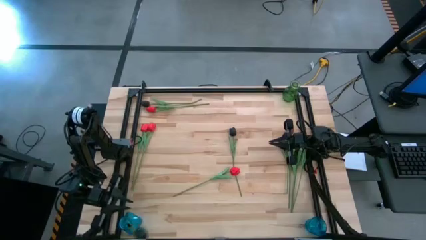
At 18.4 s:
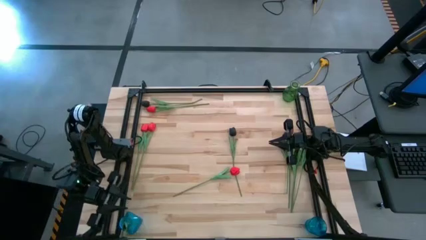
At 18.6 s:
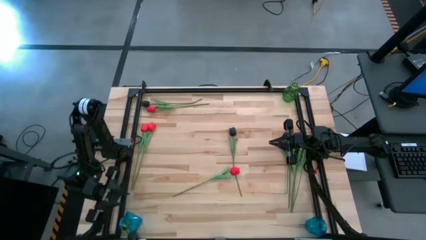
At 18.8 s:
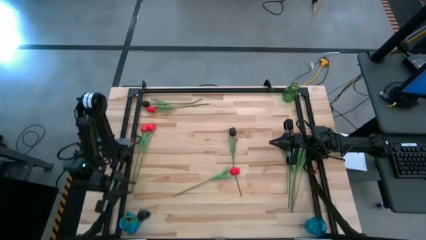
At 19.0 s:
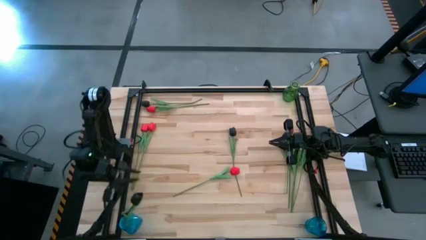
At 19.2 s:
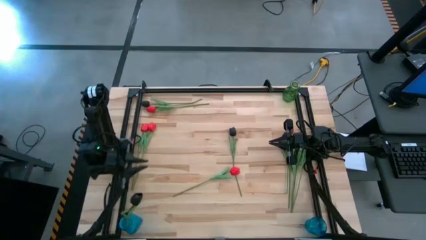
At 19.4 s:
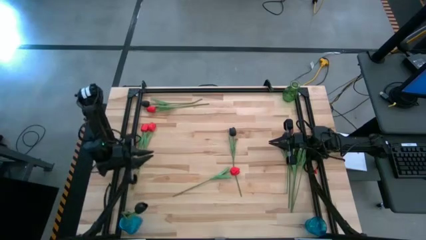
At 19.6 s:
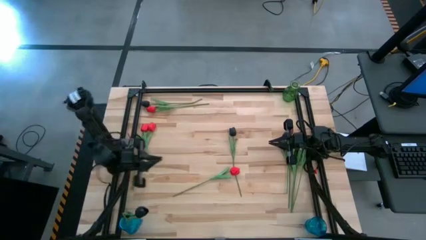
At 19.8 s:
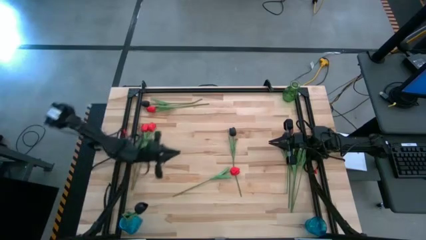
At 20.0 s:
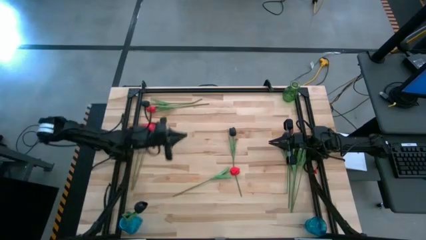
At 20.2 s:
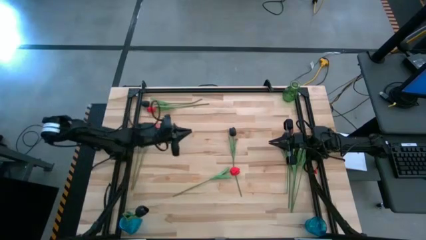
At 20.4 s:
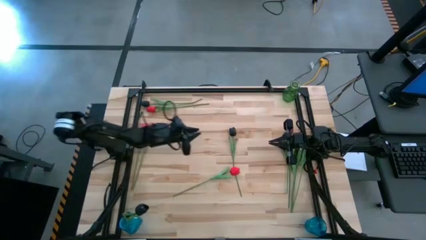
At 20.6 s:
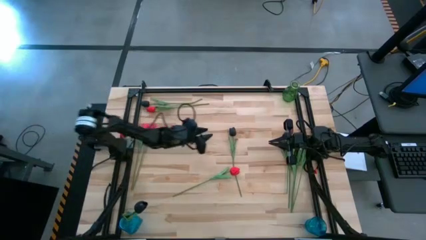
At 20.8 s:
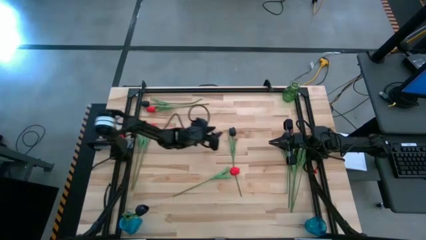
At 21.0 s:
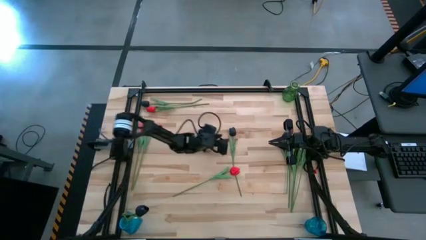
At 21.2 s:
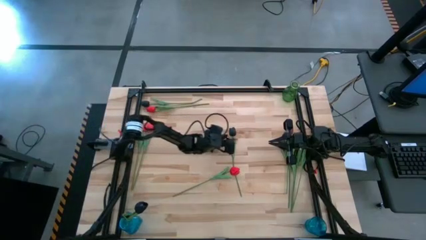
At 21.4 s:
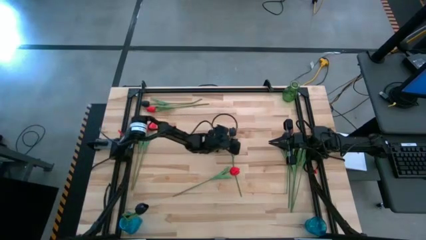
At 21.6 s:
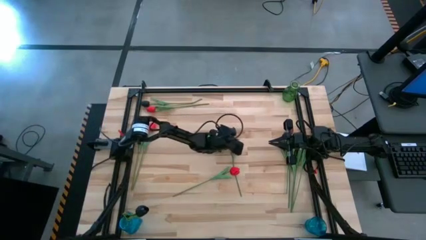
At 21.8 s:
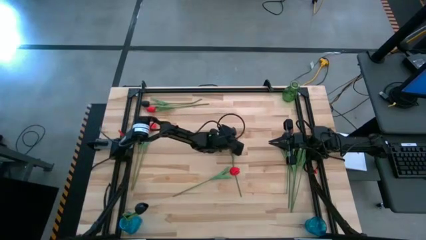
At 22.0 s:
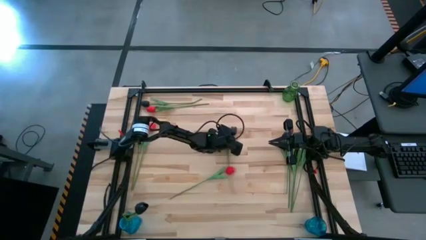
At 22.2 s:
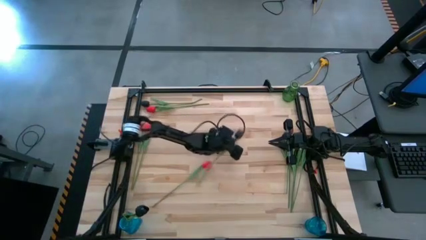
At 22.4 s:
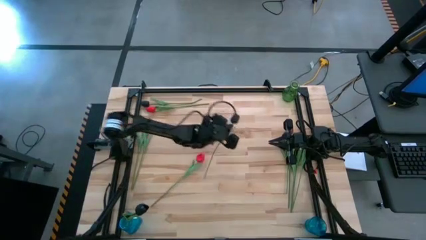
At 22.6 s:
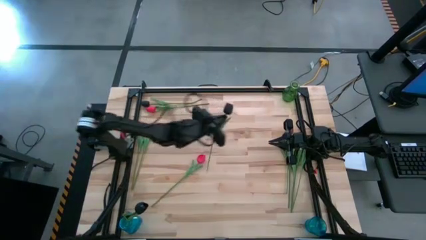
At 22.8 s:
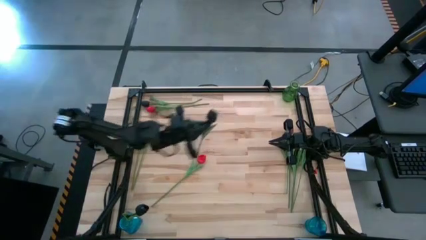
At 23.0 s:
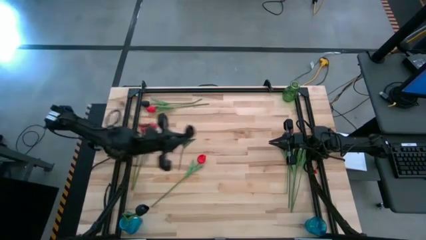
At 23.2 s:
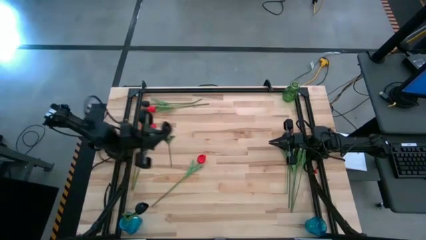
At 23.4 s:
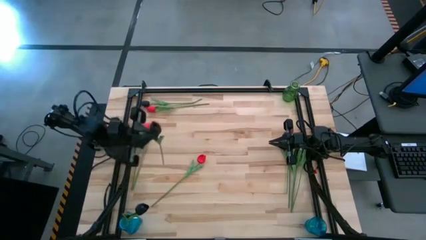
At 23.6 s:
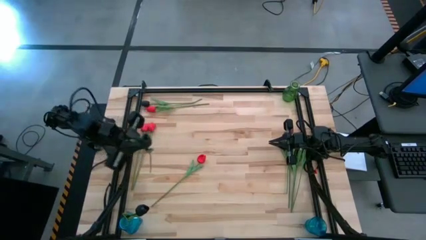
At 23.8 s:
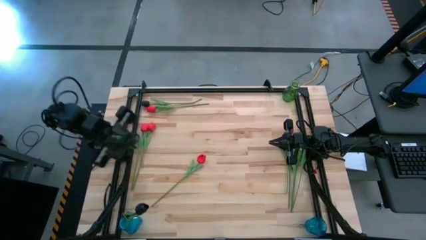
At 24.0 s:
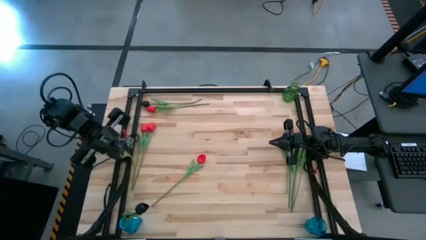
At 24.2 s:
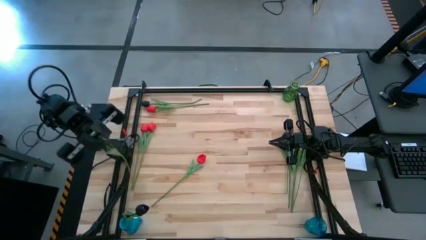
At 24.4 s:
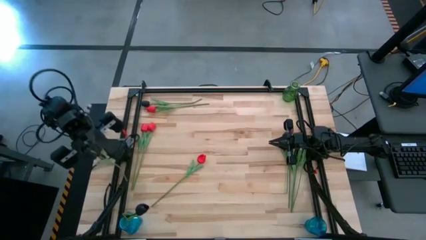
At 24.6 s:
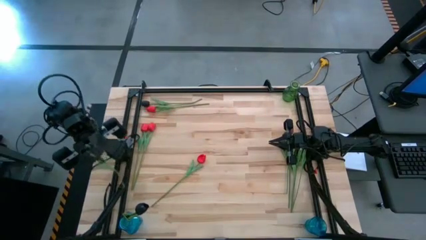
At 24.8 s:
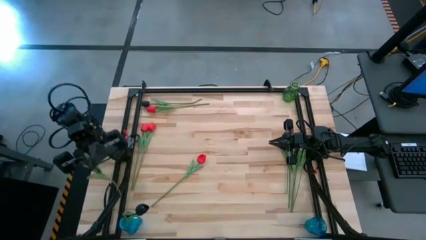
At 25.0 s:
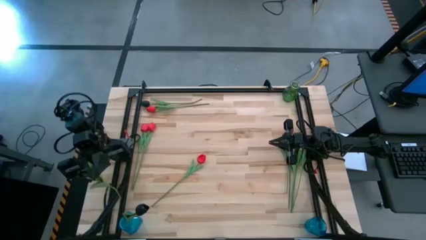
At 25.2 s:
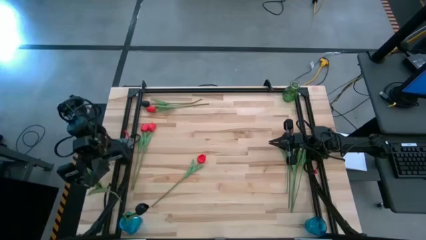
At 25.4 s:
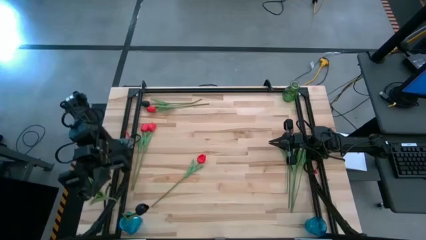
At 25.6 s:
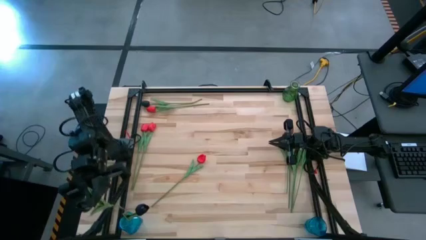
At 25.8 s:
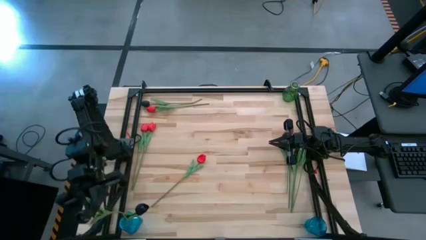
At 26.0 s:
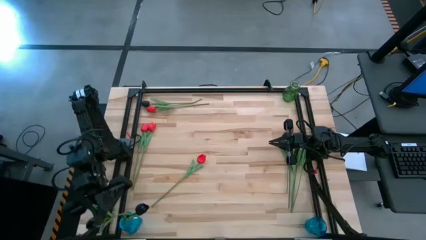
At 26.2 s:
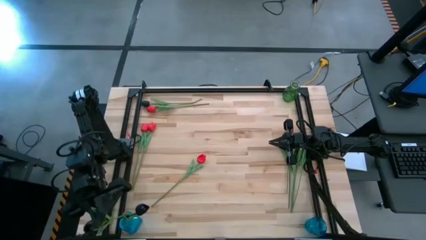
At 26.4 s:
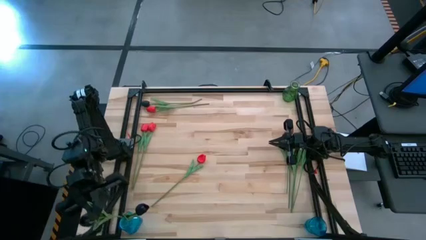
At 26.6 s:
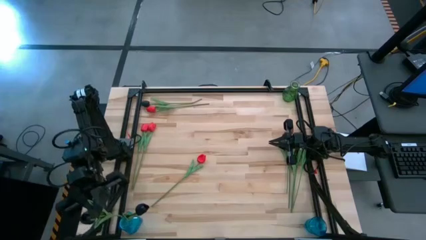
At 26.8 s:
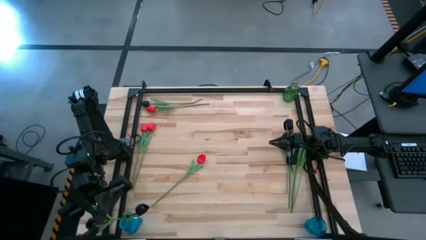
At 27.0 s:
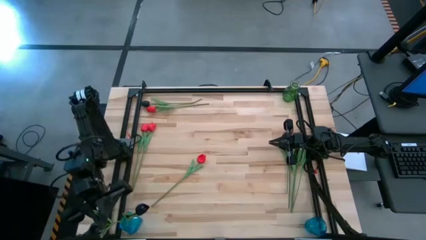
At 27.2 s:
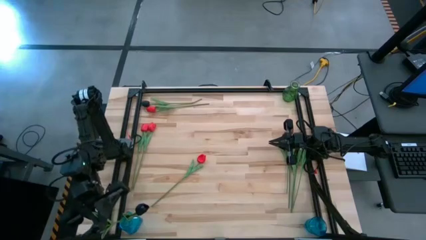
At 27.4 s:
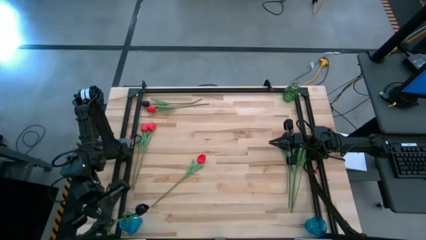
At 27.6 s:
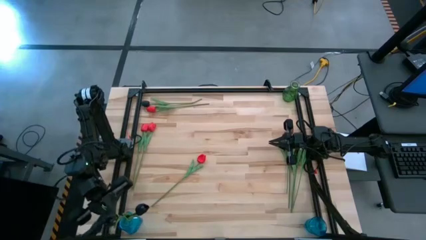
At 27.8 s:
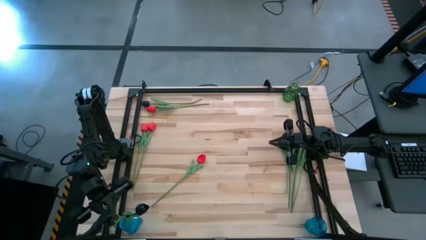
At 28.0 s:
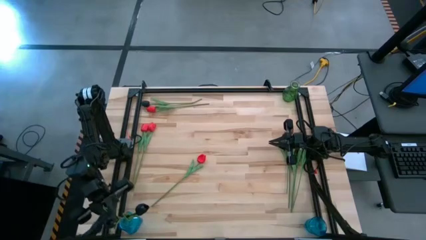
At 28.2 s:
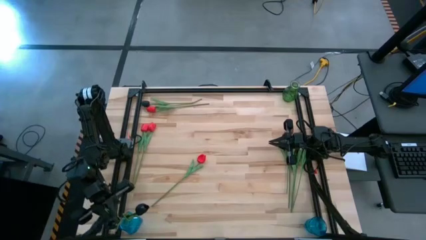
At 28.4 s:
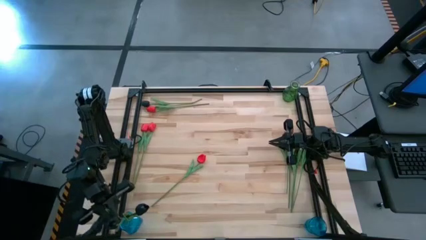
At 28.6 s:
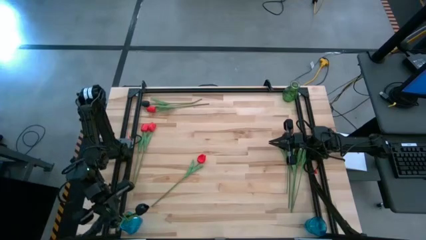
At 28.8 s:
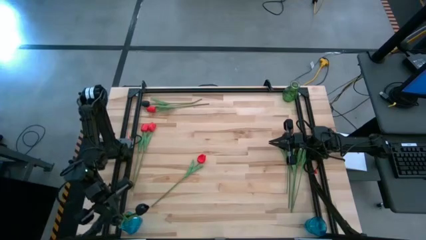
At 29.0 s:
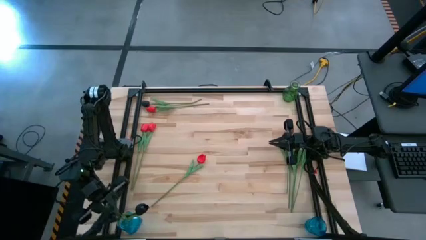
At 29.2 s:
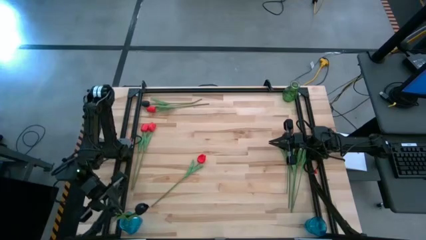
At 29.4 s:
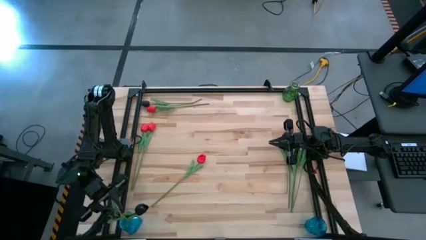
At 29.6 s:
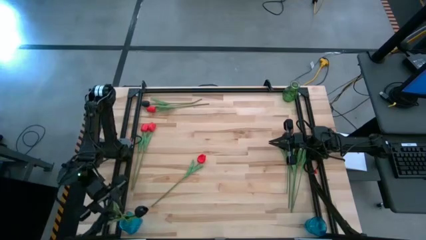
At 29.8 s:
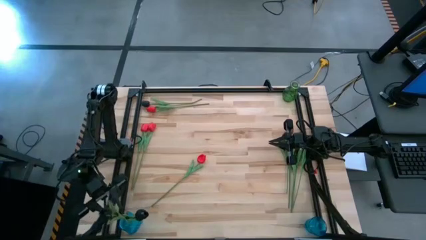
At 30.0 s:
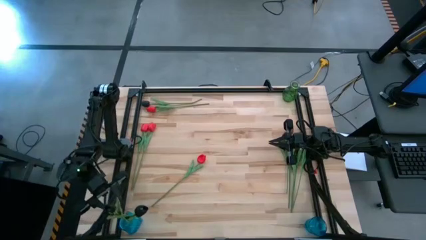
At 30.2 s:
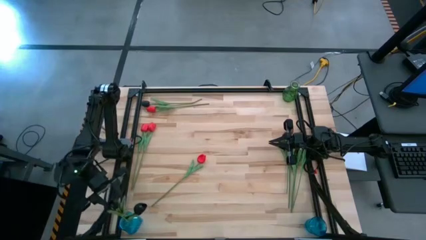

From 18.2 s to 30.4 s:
Task: Sort flowers into vase by color
Put the black tulip into the left blue vase

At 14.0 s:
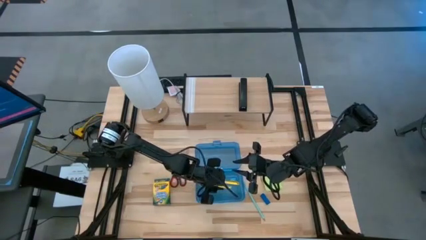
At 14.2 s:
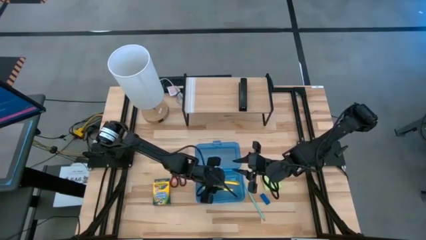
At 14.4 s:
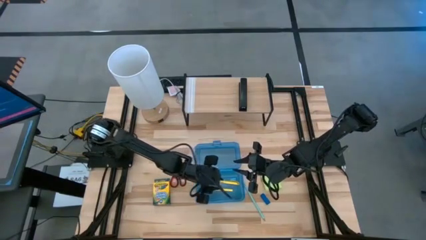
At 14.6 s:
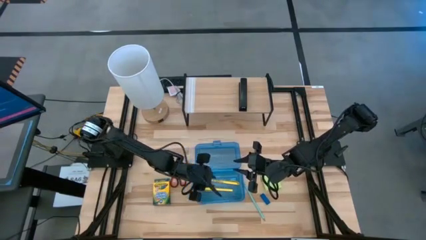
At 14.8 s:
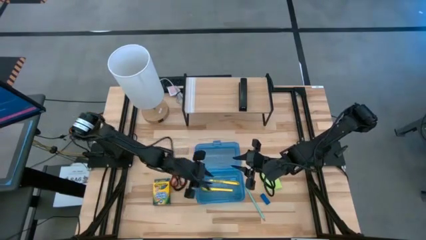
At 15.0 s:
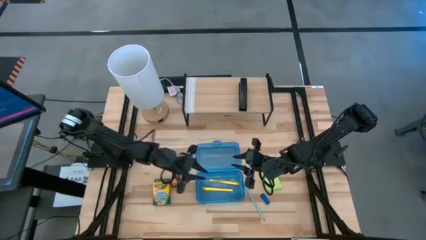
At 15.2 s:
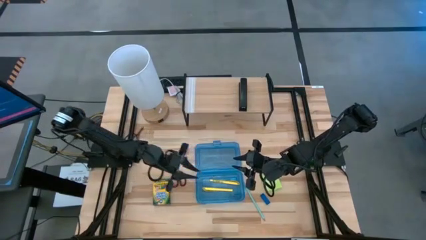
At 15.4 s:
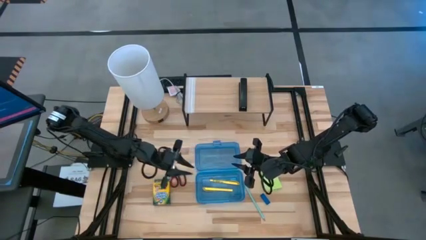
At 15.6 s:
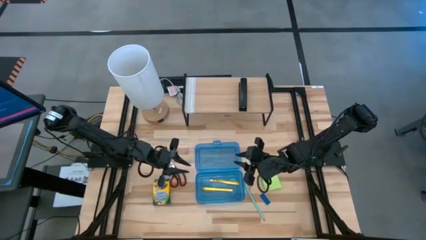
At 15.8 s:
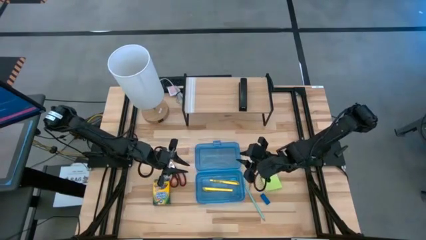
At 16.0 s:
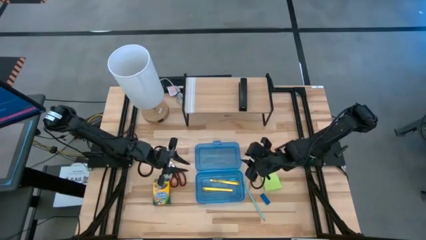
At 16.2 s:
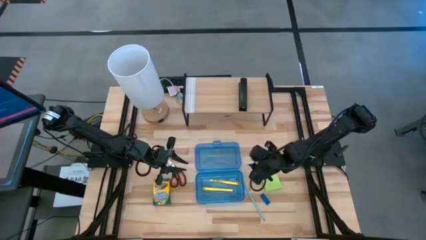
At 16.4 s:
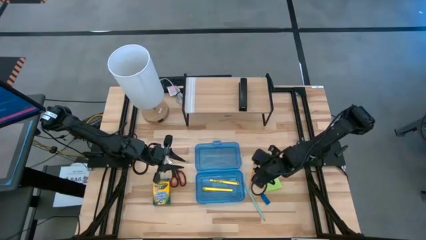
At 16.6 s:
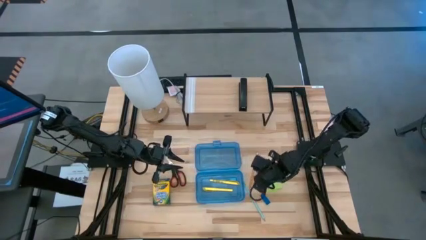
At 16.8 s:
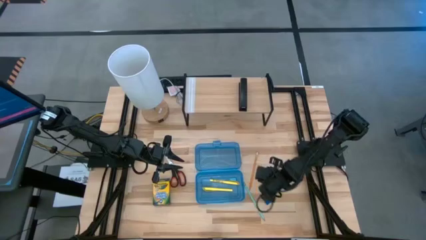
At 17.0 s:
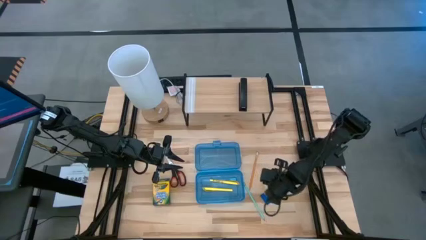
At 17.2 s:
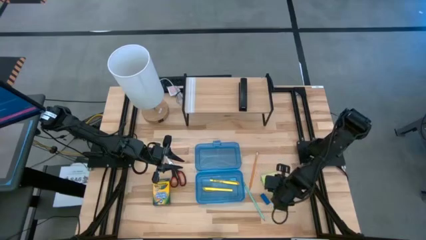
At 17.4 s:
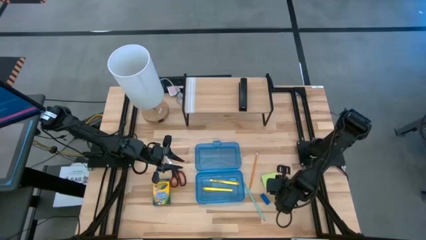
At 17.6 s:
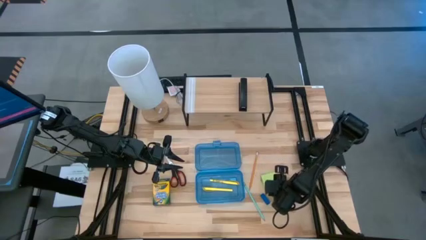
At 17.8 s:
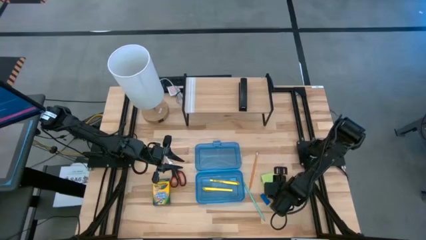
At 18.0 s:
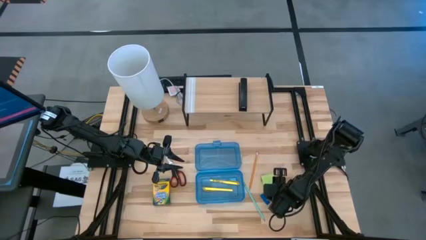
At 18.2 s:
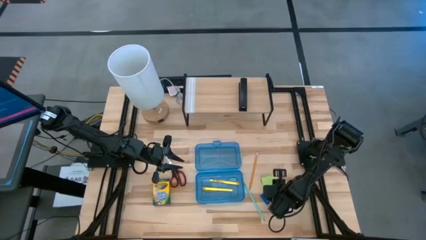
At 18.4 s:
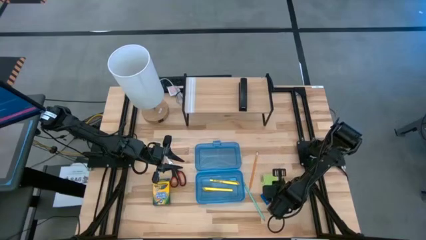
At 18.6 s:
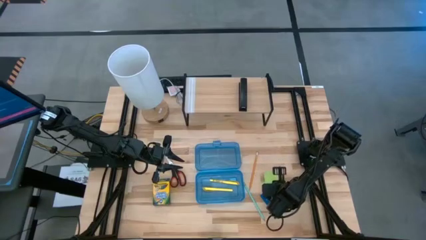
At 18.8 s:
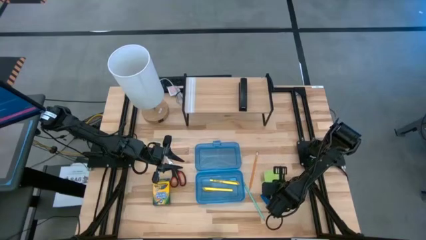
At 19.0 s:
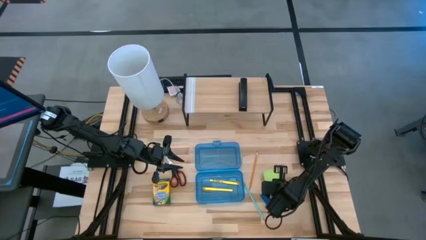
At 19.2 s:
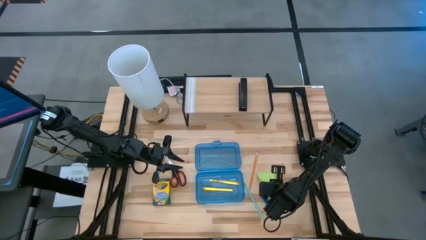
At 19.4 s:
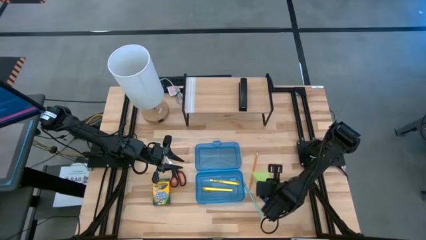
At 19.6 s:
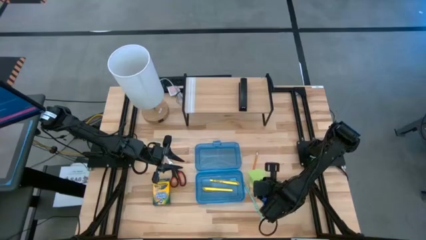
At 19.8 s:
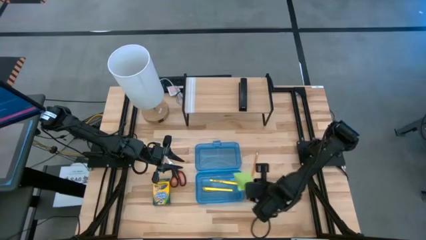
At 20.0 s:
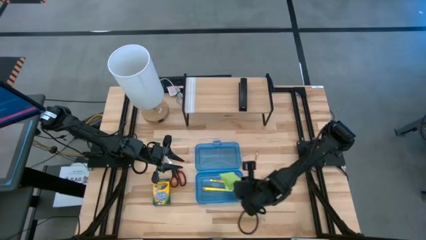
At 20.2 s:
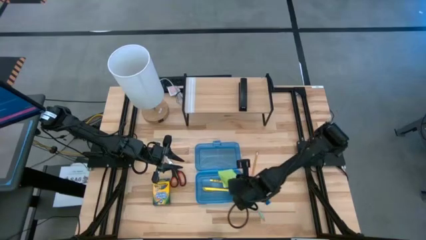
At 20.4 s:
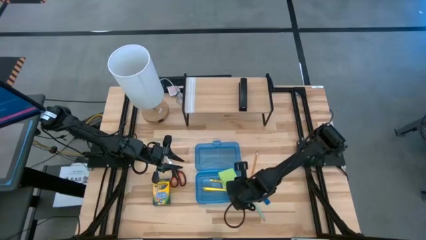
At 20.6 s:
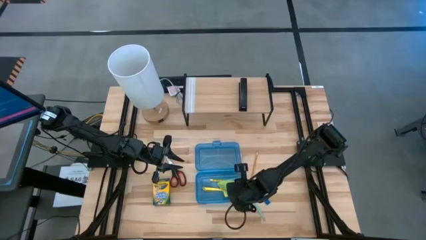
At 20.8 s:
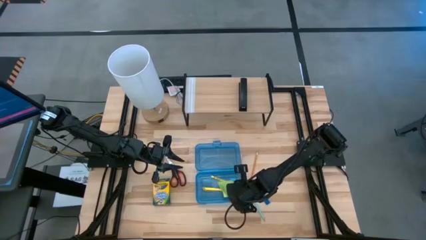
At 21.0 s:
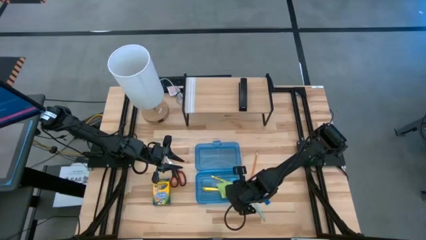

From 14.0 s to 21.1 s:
Task: Pack school essentials
Put the green sticky notes into the blue supply box
